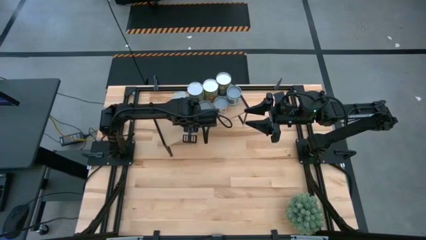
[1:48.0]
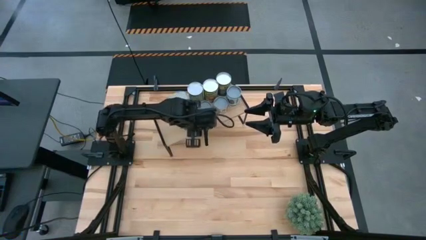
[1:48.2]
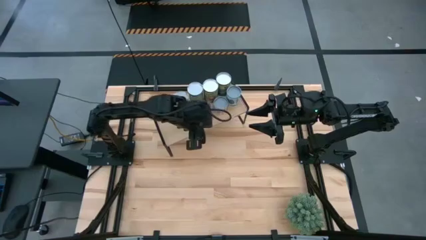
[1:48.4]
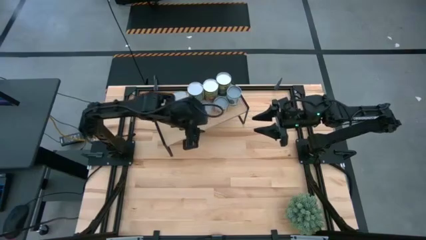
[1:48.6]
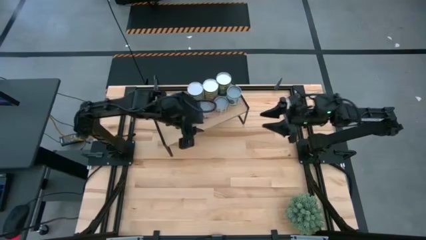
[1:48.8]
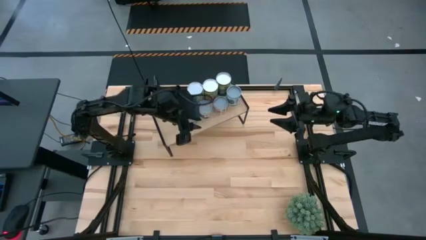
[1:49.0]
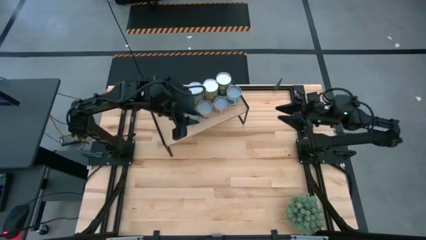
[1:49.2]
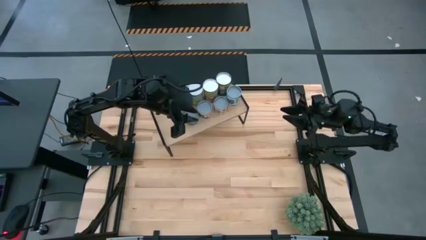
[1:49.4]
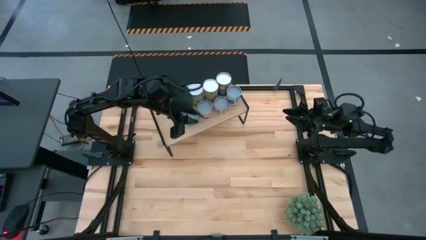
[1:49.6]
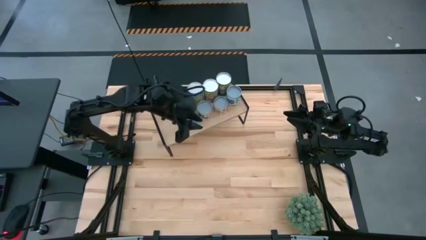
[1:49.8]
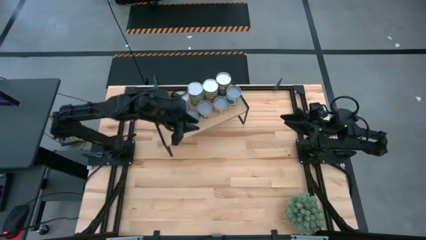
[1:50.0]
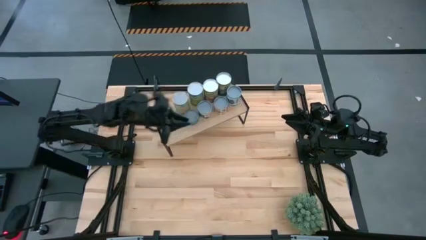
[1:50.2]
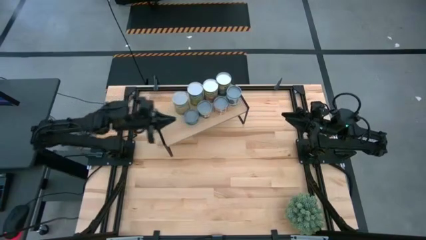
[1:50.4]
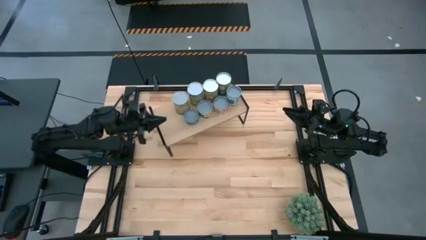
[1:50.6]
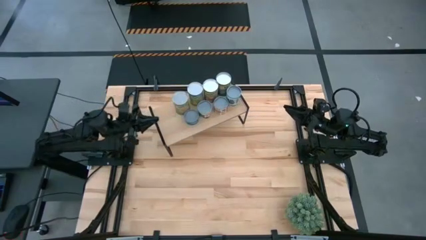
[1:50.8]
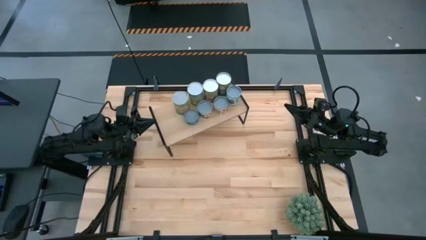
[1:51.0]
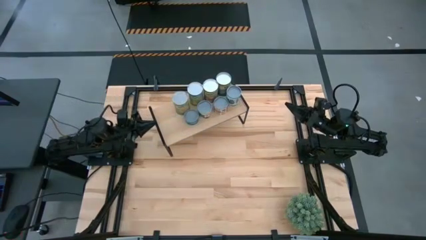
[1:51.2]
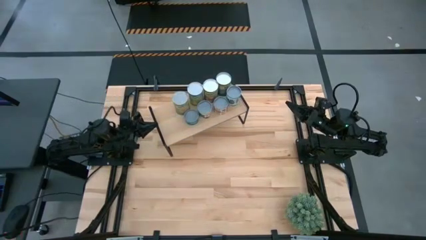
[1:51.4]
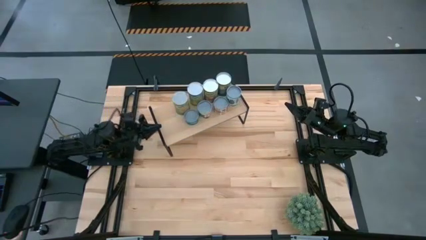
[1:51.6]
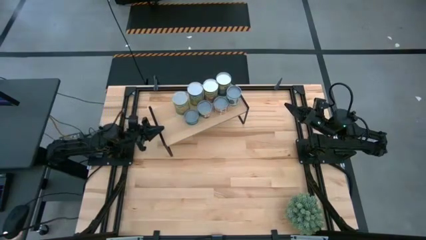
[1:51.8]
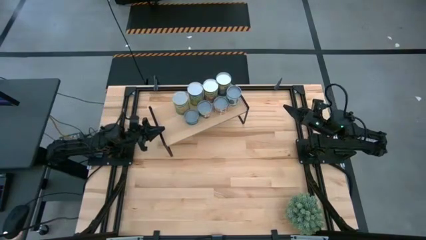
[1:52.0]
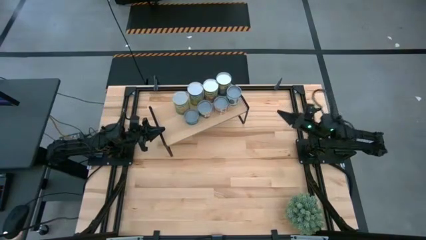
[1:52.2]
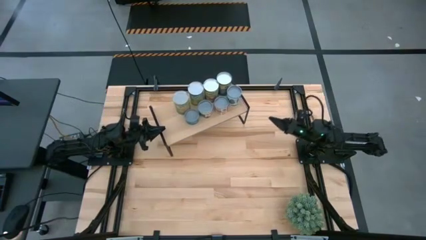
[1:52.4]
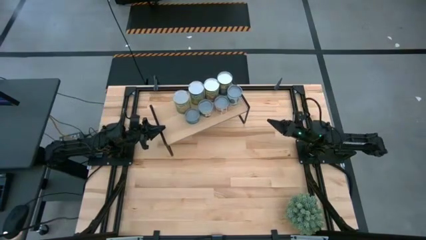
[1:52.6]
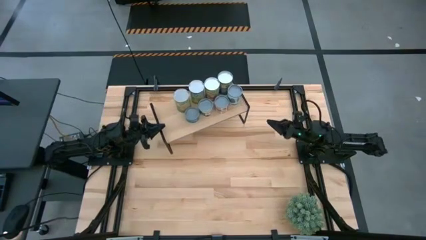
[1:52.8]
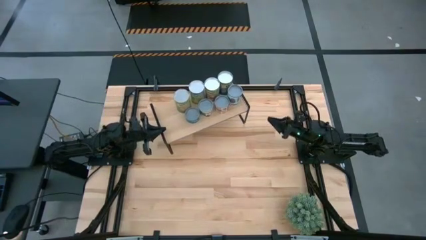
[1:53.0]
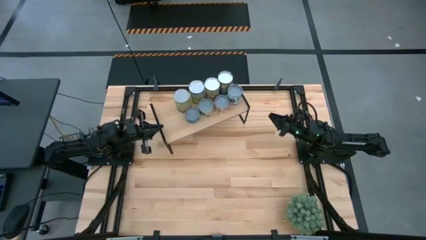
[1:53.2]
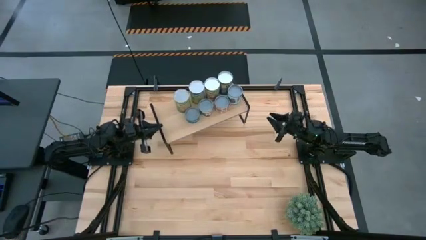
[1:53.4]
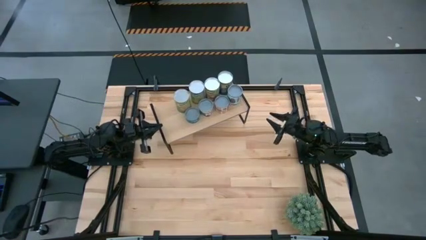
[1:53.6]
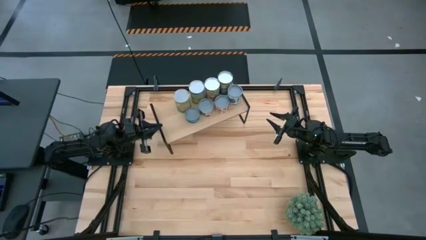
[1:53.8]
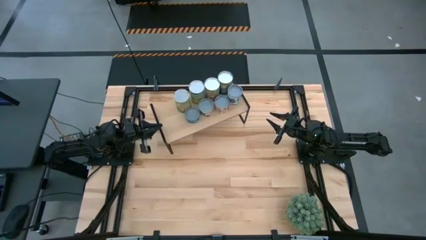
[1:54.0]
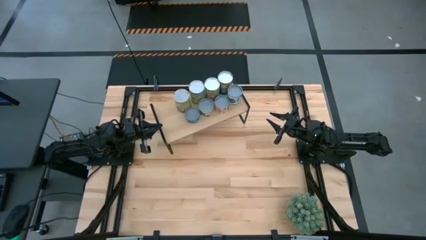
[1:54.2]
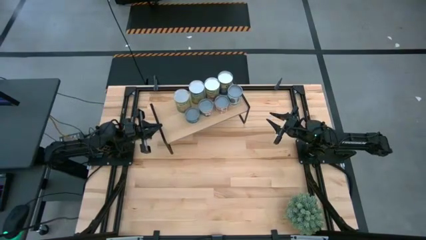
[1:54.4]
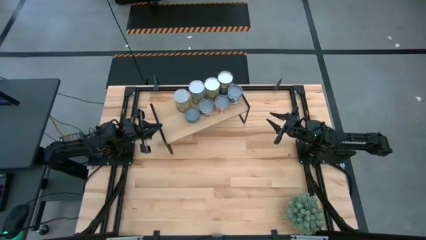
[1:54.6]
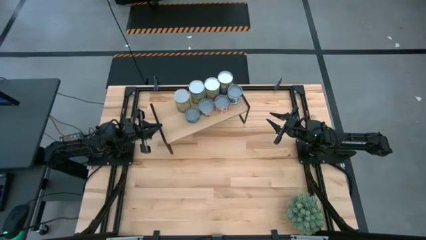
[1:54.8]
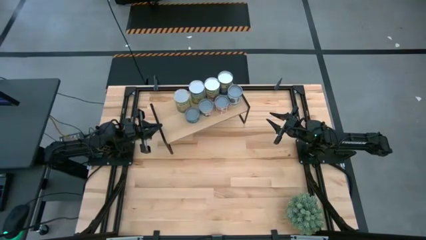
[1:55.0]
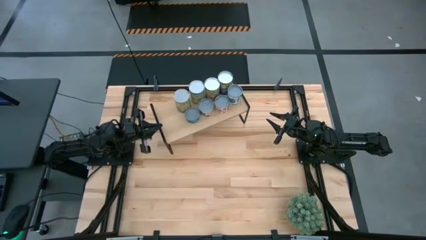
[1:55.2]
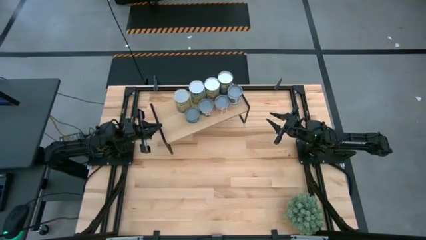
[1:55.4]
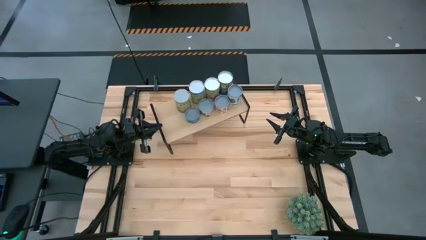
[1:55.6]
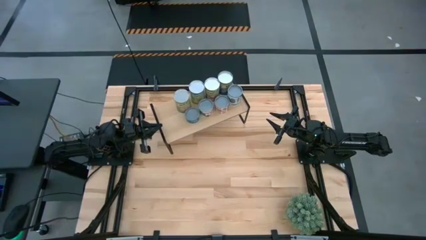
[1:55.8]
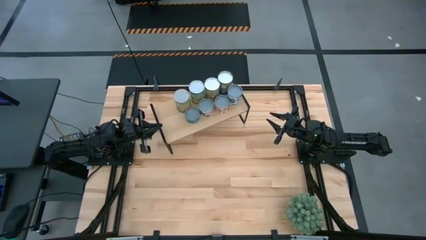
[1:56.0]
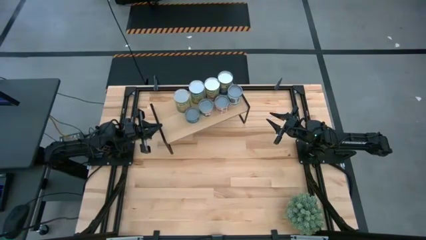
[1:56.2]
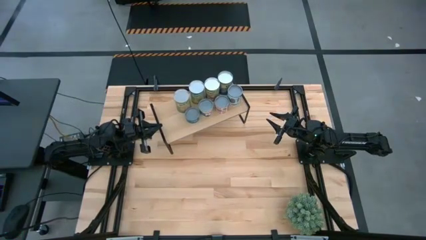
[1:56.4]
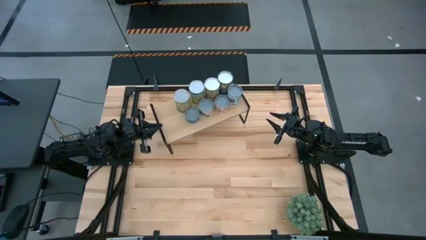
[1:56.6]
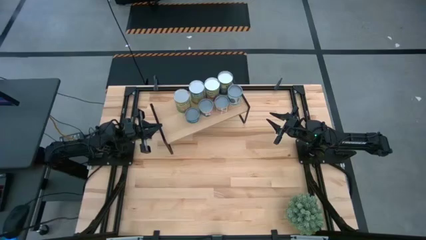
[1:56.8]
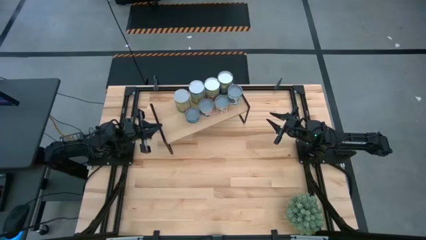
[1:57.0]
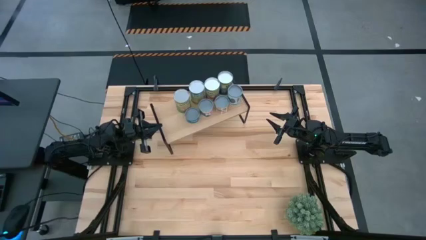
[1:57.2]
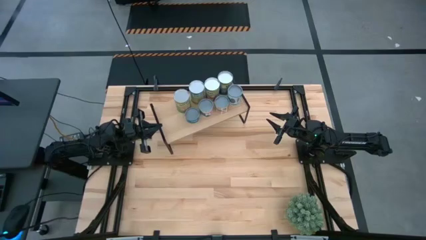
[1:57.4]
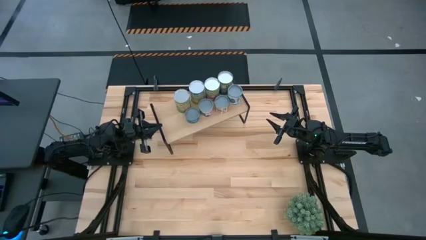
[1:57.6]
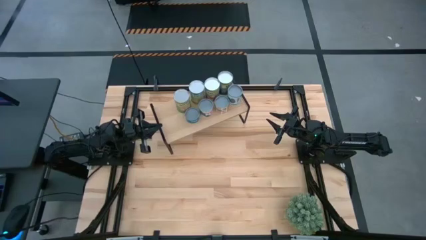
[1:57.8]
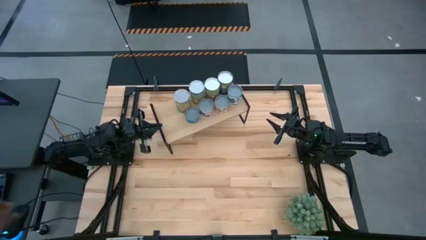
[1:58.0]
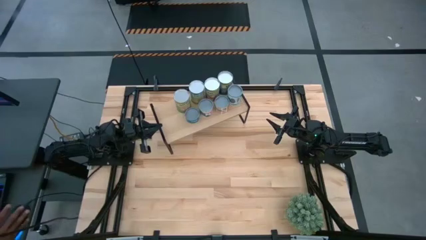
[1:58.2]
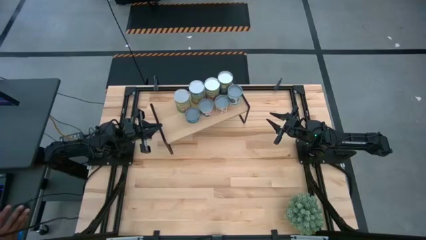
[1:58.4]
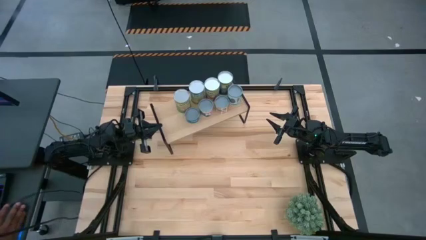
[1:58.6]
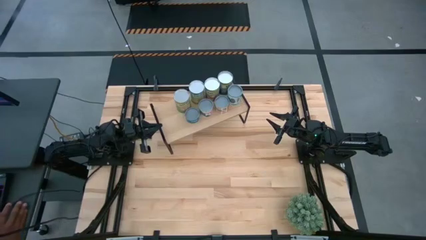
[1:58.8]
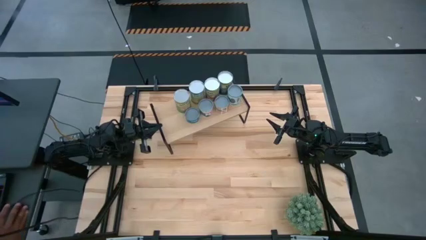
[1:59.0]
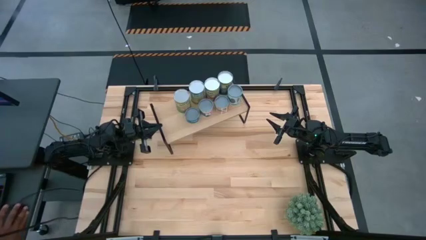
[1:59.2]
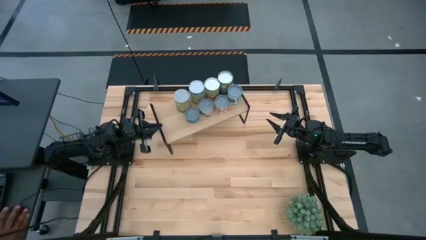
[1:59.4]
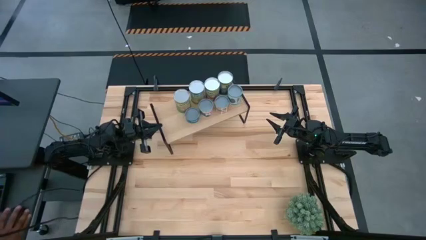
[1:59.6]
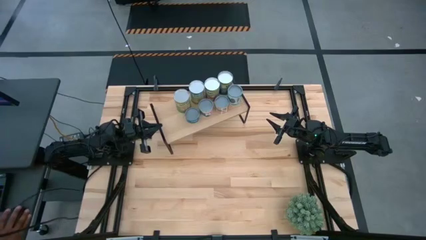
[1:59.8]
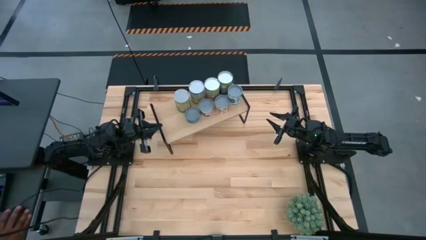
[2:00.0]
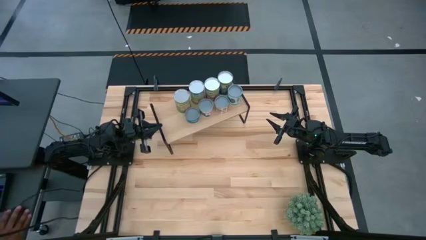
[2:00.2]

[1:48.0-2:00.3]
Task: Pick and place cans onto a shelf
Return to Home Position

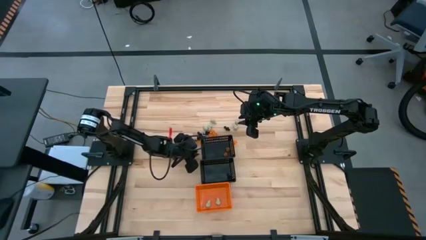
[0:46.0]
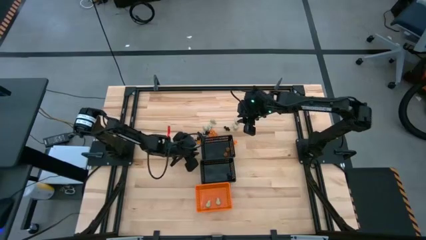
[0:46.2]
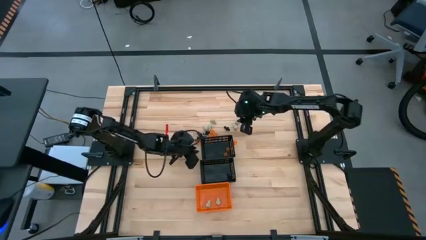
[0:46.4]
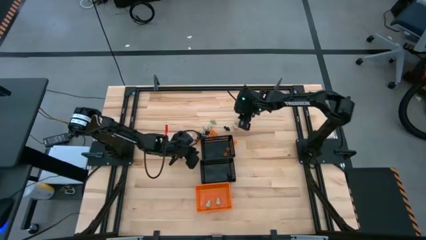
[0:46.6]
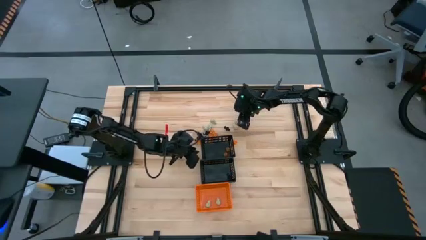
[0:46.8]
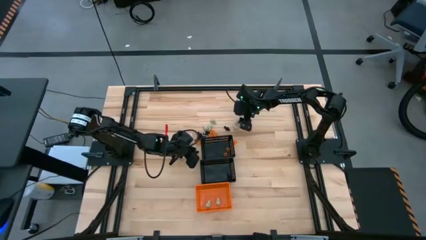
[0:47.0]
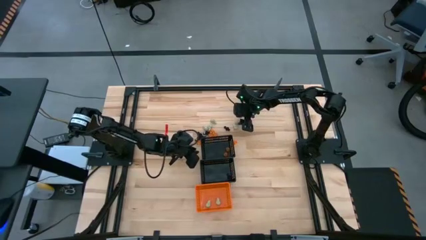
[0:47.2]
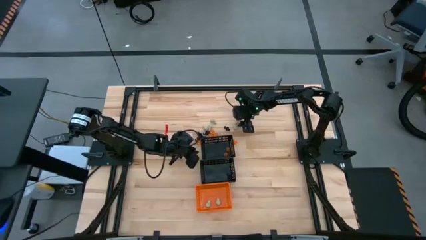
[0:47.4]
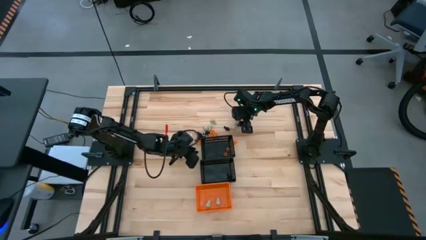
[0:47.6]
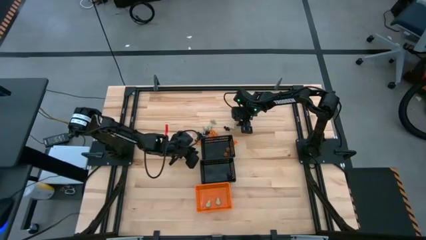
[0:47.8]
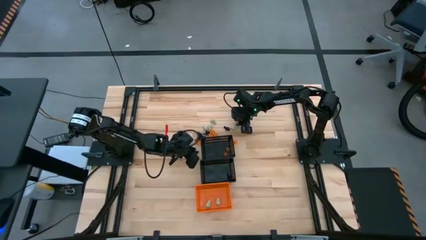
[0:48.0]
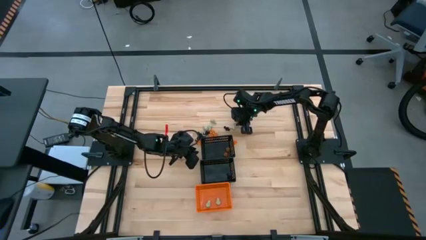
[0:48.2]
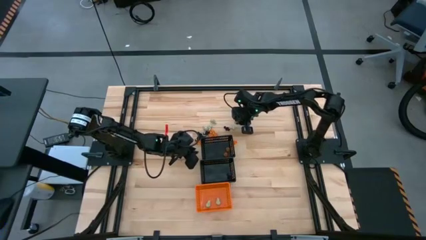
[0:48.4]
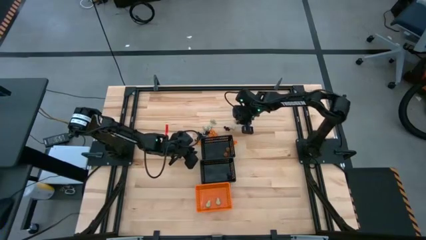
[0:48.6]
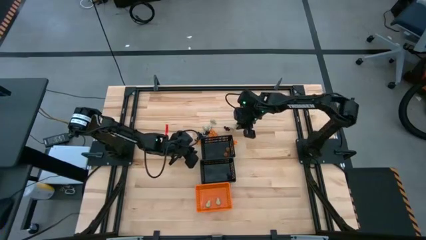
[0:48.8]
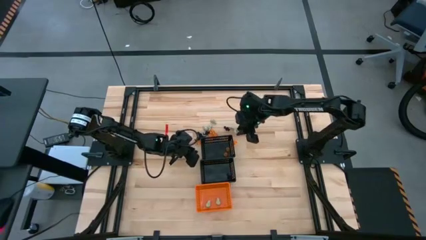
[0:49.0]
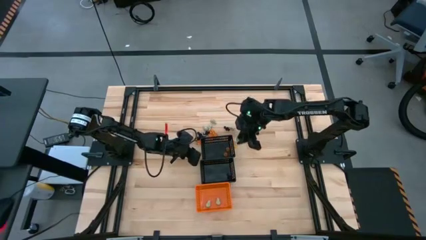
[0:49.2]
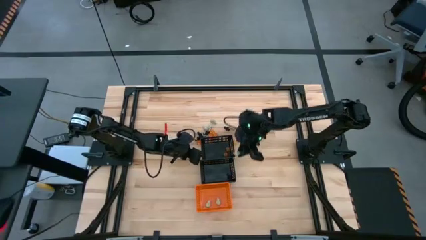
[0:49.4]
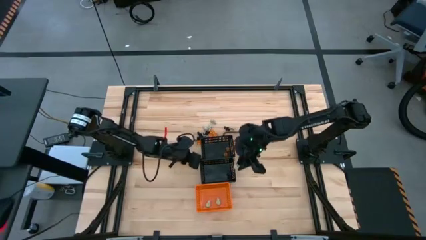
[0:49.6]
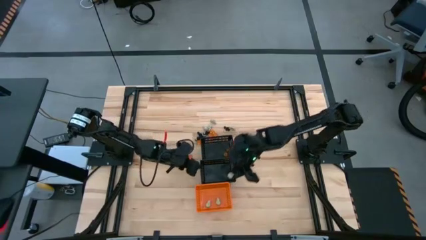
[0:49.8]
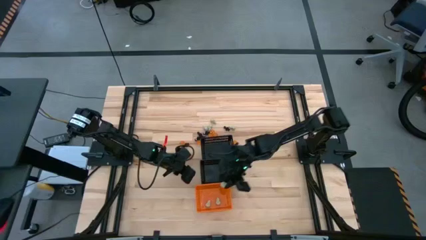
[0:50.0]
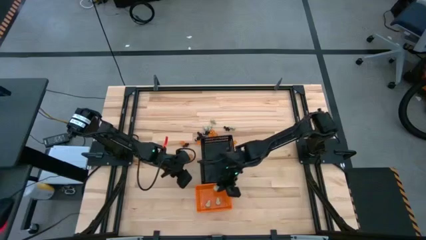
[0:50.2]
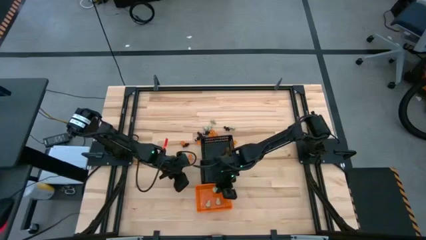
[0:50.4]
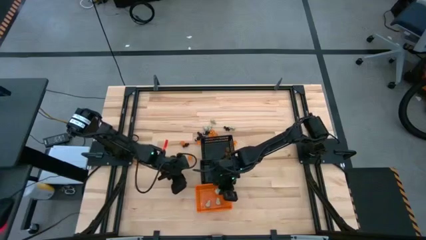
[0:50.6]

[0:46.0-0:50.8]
Task: Sort Halloween decoration
Put the white skull toy into the orange bin
